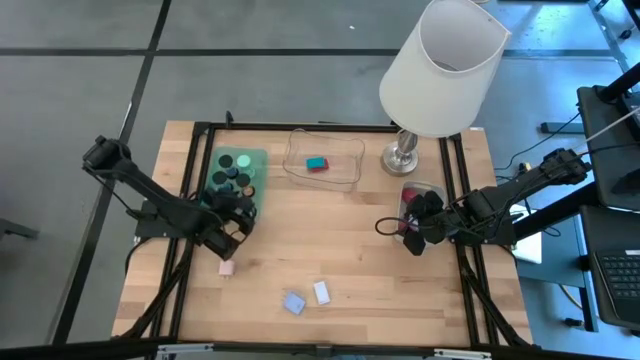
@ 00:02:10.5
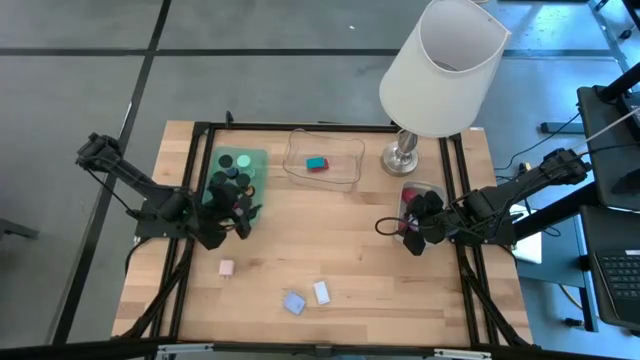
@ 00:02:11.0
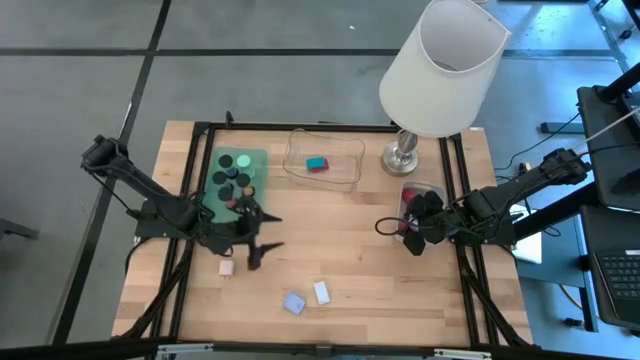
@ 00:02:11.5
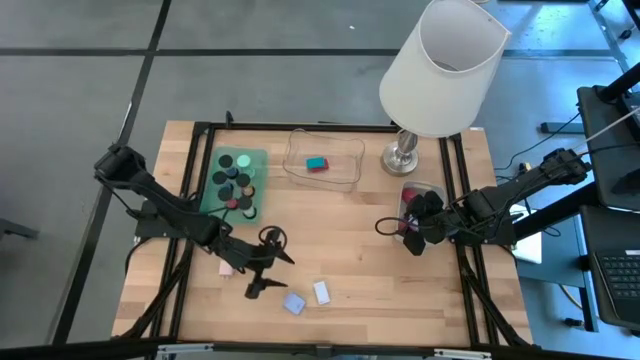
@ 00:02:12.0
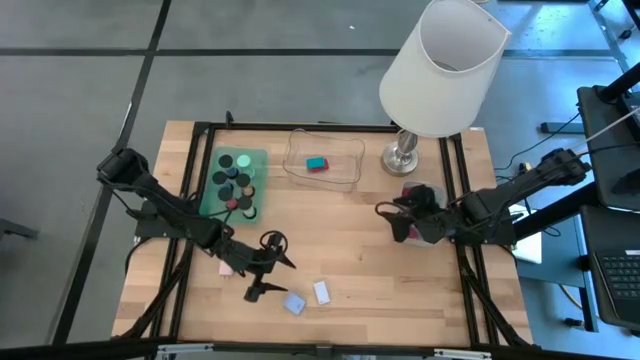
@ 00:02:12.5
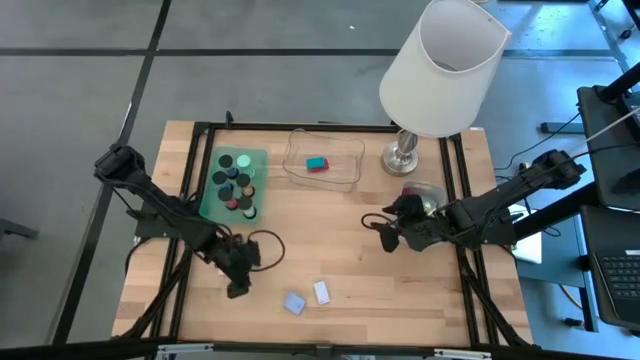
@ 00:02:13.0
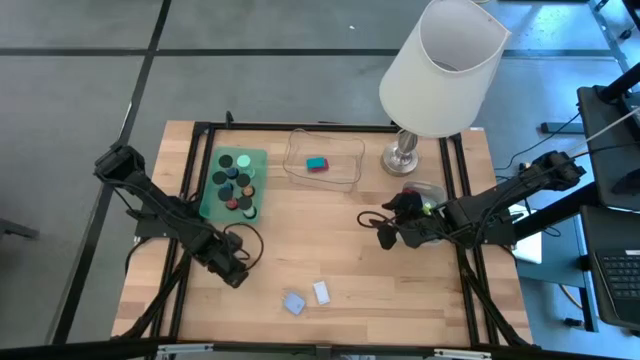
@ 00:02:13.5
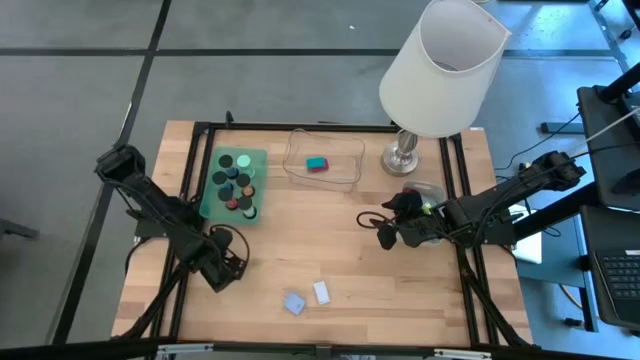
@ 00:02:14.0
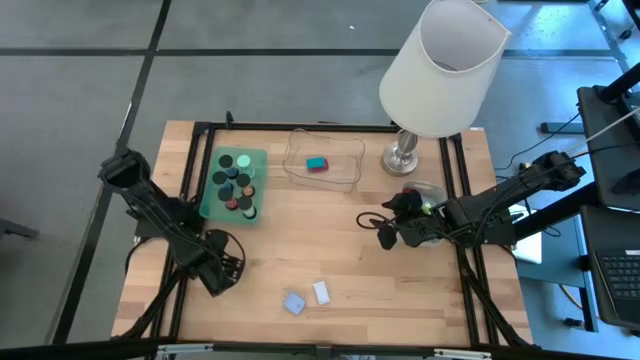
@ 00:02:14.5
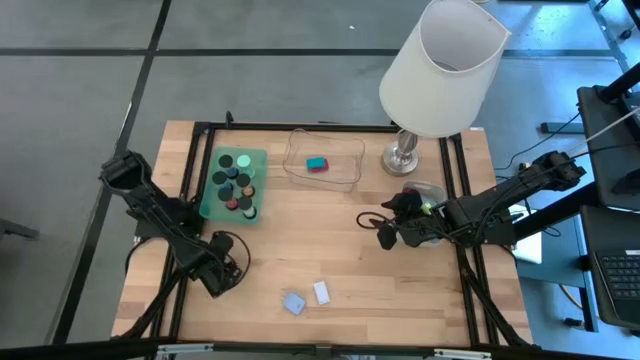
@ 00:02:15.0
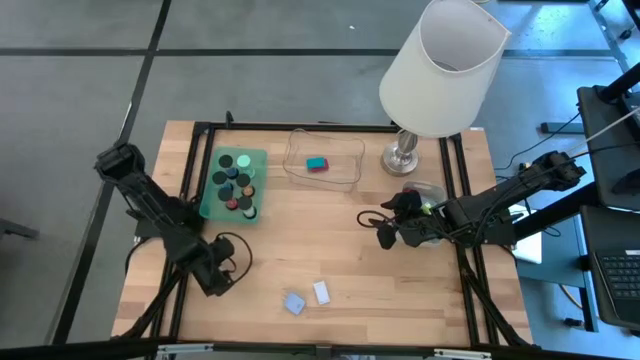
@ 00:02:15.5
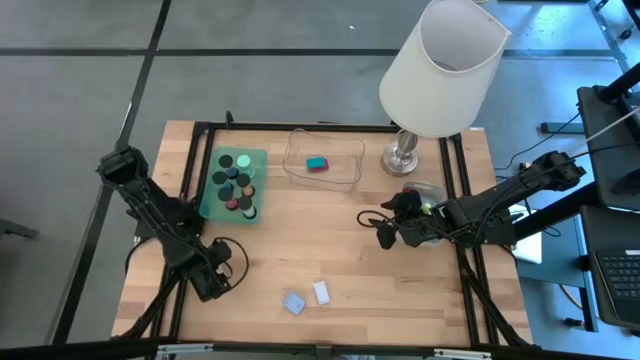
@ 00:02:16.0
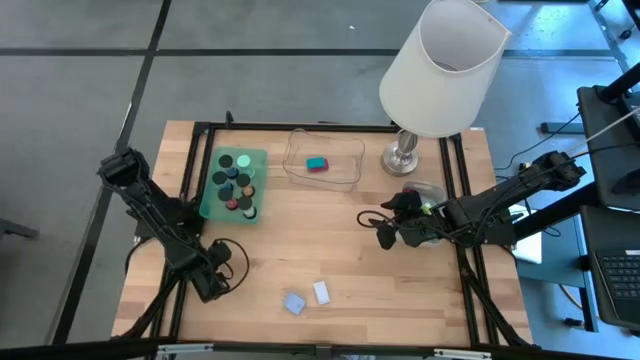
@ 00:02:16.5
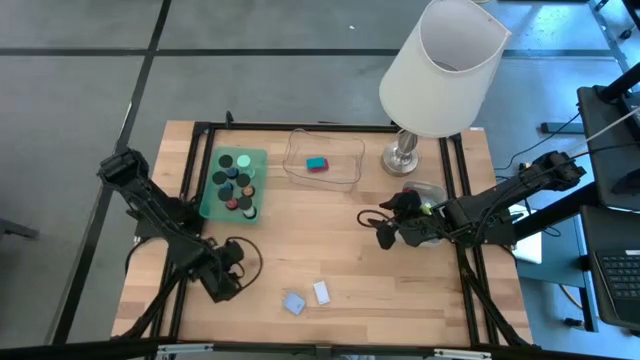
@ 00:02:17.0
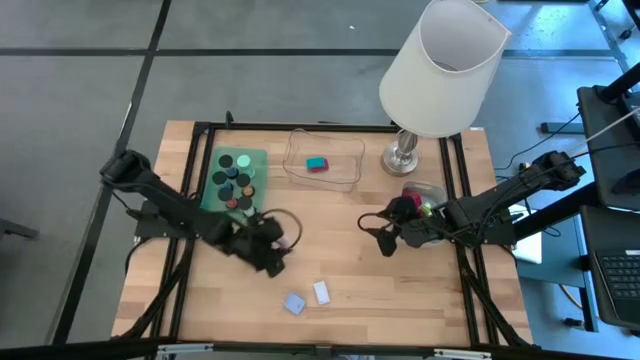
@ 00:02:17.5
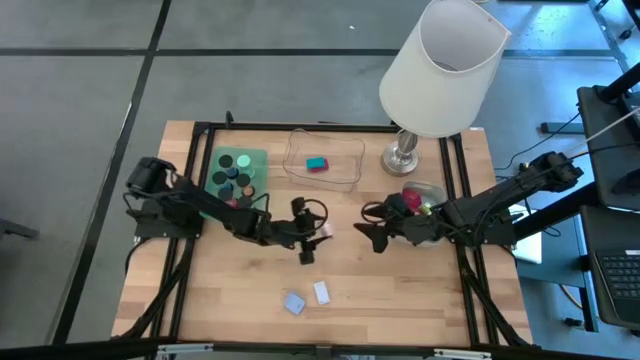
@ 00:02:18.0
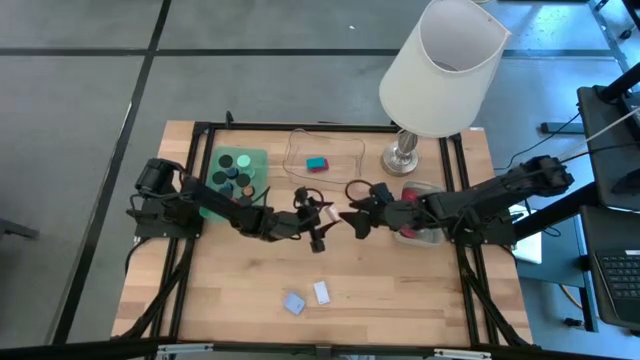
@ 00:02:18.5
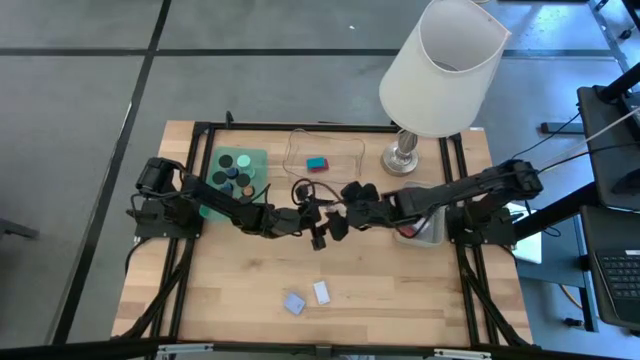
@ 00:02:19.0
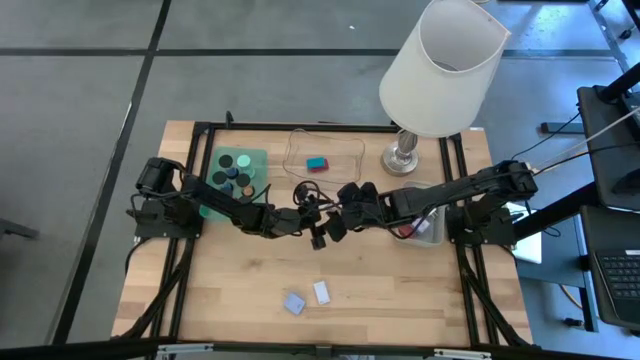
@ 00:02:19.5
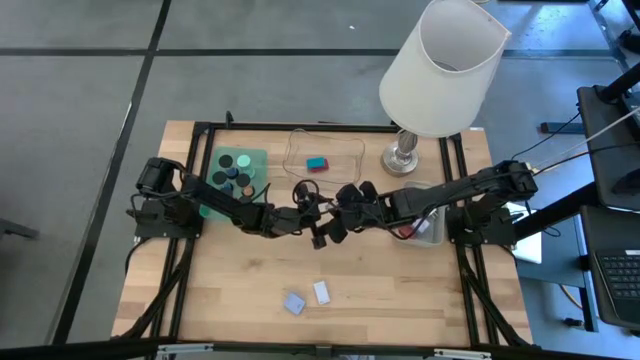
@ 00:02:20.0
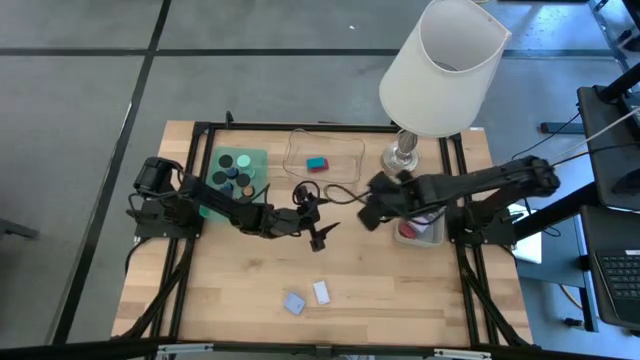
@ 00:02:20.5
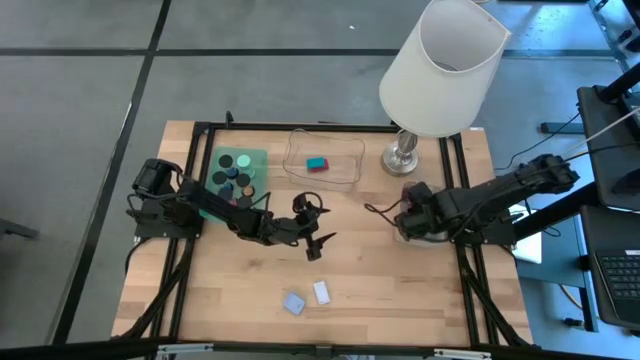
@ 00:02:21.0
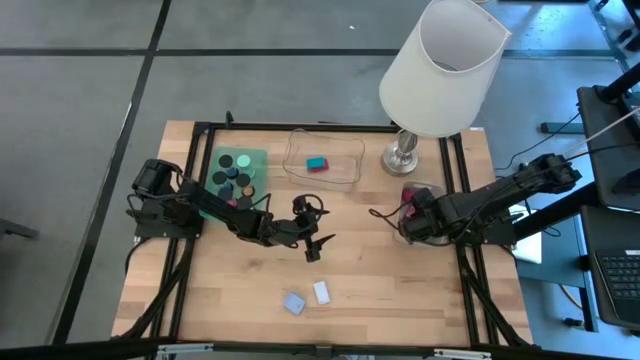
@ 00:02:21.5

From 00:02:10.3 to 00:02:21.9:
Task: Pick & Place Office items
Put the light pink charger adapter into the gray bin

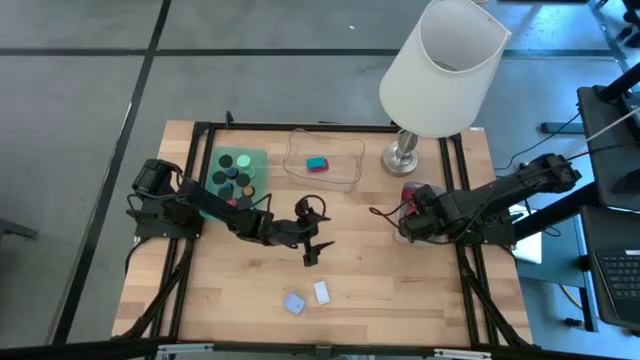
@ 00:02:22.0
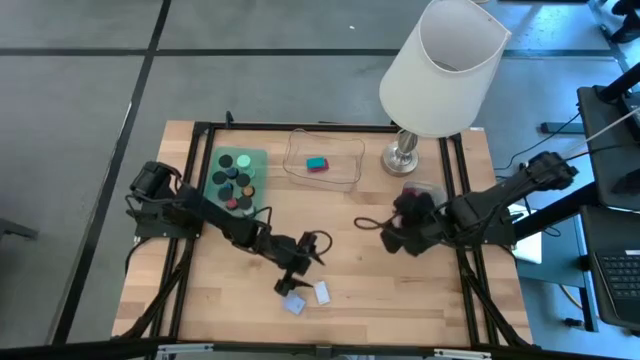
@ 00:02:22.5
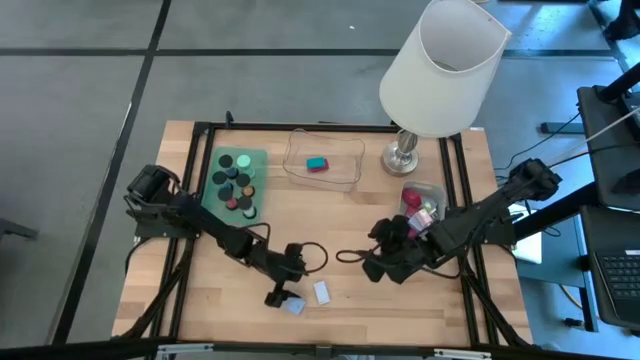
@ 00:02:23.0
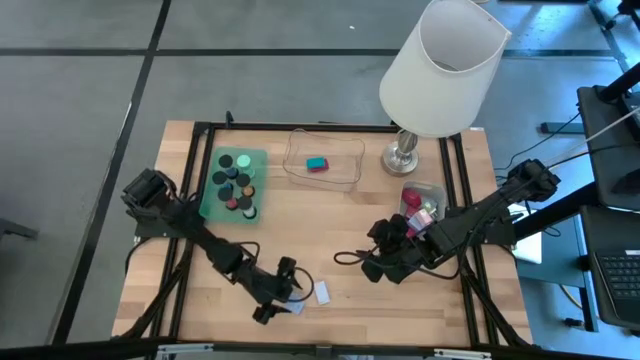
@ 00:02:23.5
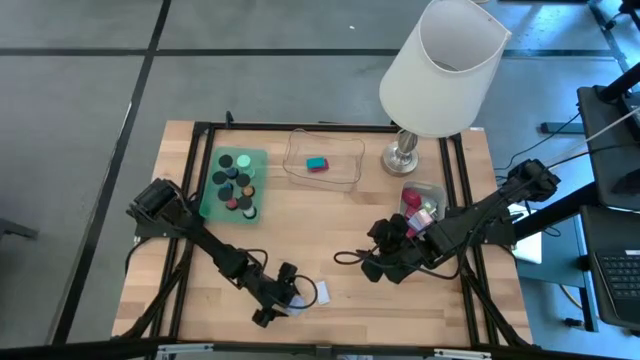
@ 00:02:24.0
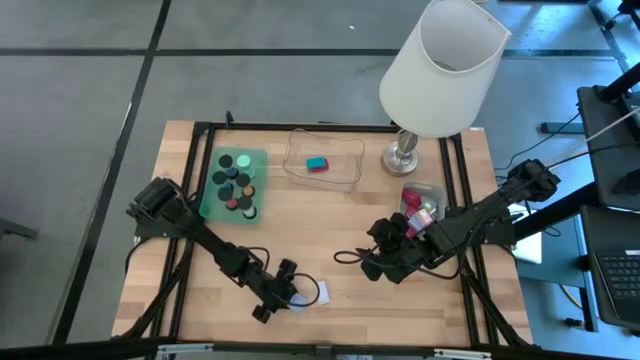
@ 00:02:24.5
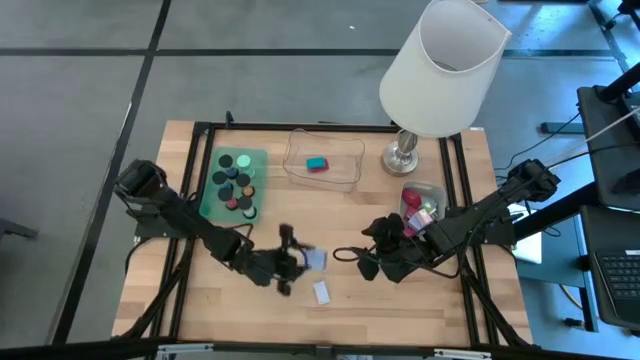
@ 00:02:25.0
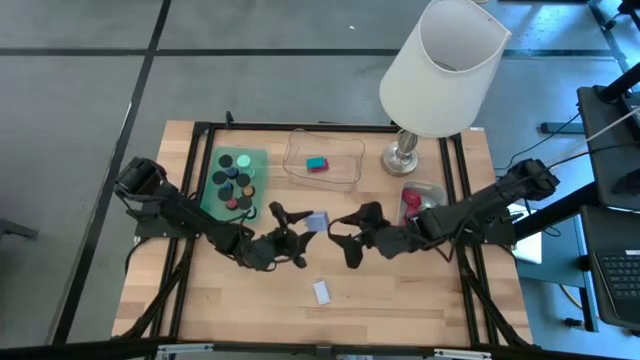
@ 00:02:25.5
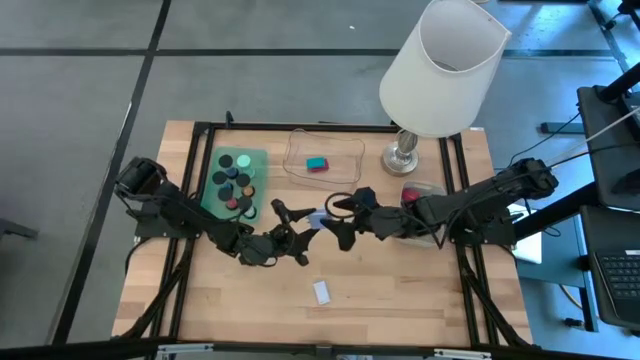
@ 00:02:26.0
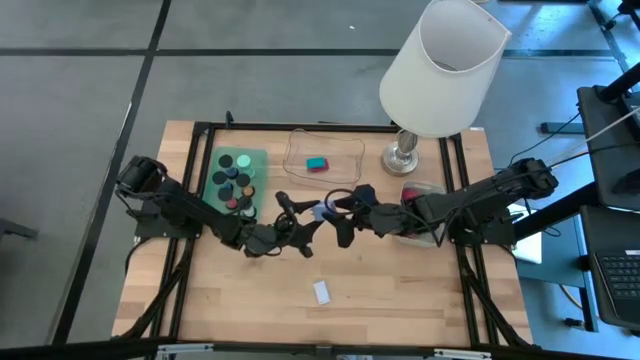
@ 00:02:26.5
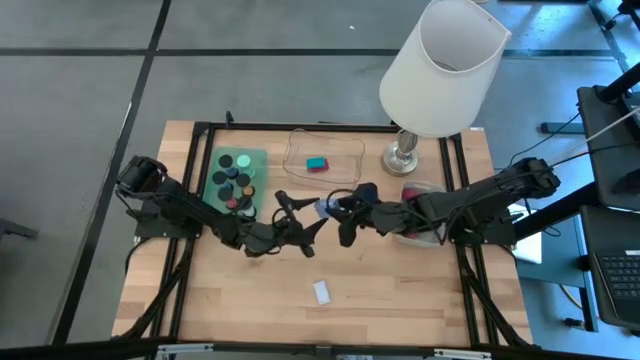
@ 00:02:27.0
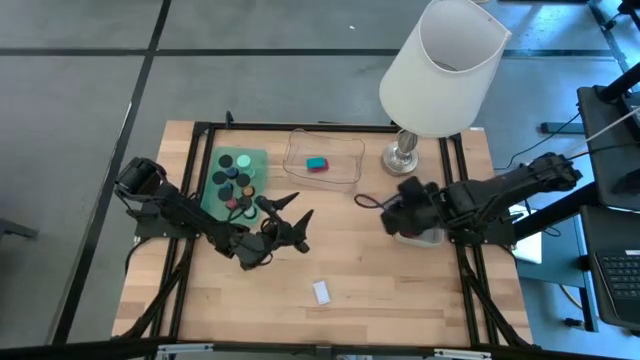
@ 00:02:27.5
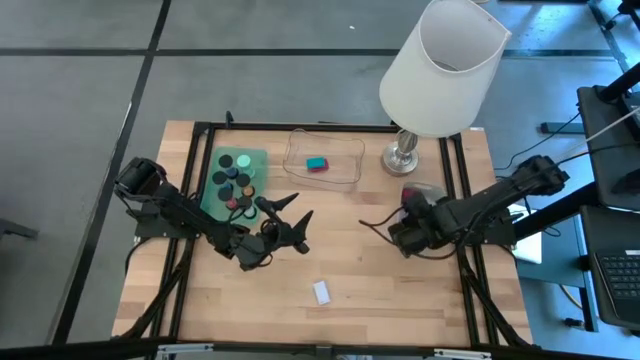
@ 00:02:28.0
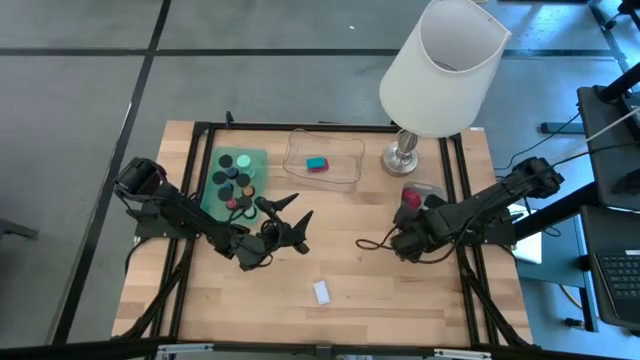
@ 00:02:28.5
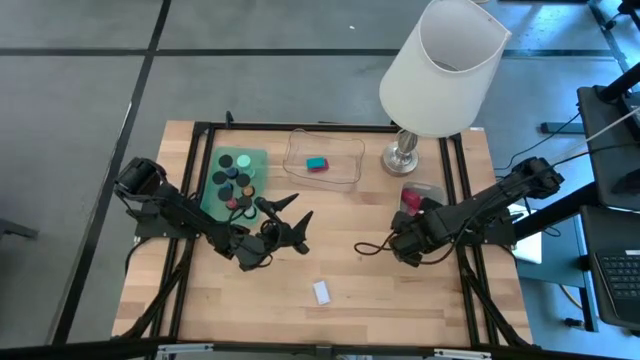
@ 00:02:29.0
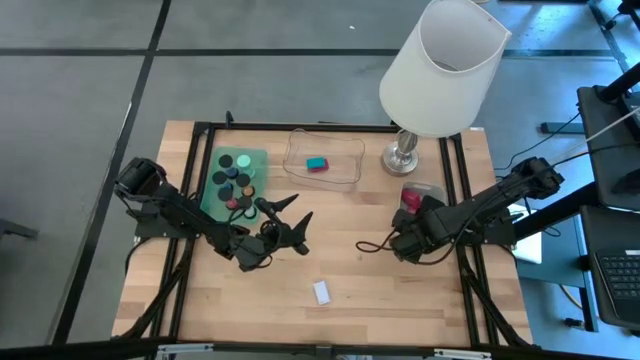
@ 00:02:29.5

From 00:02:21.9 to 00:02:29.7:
Put the blue charger adapter into the gray bin

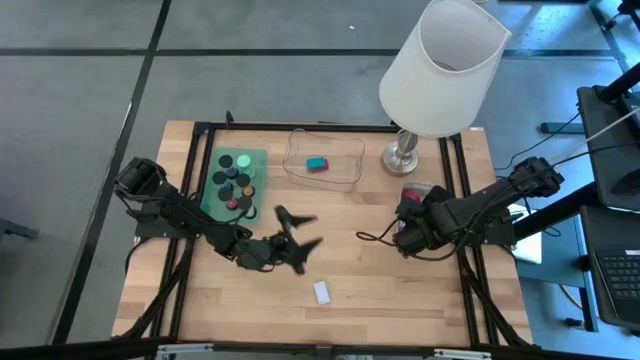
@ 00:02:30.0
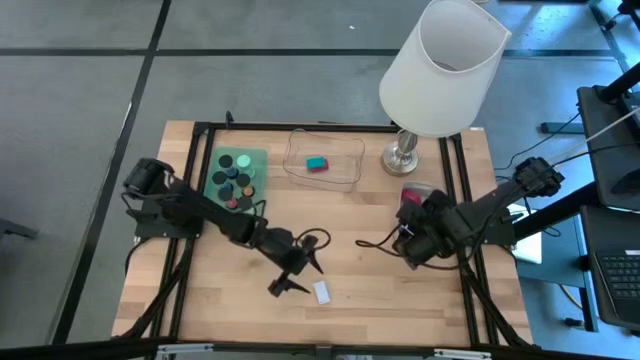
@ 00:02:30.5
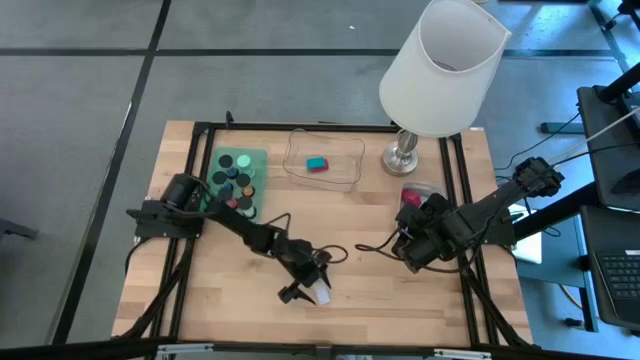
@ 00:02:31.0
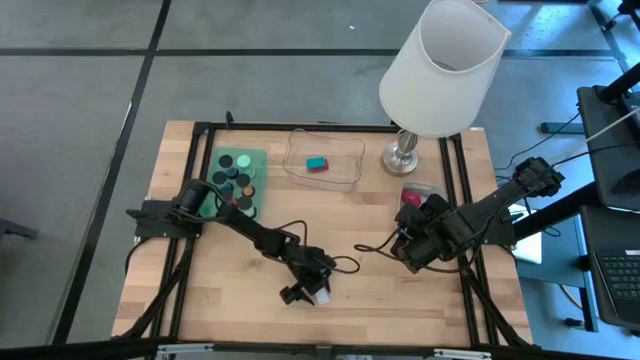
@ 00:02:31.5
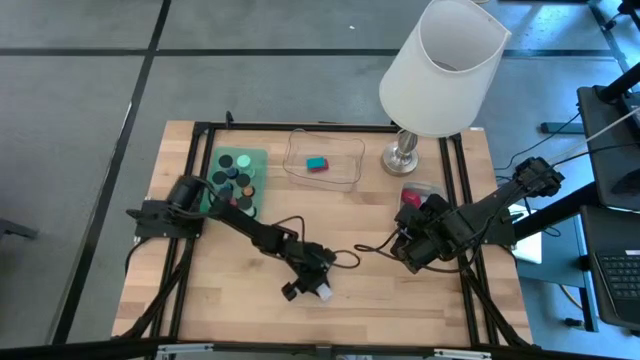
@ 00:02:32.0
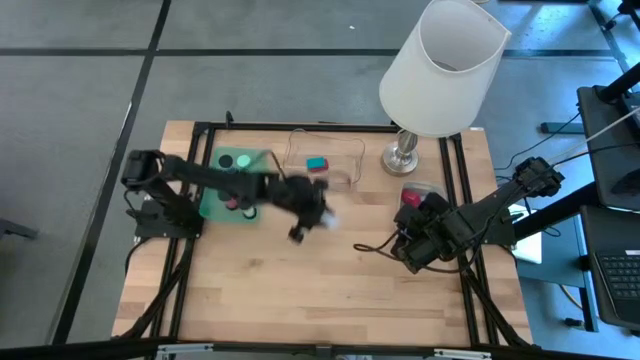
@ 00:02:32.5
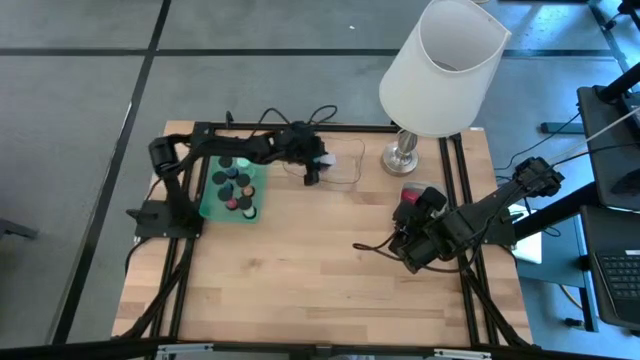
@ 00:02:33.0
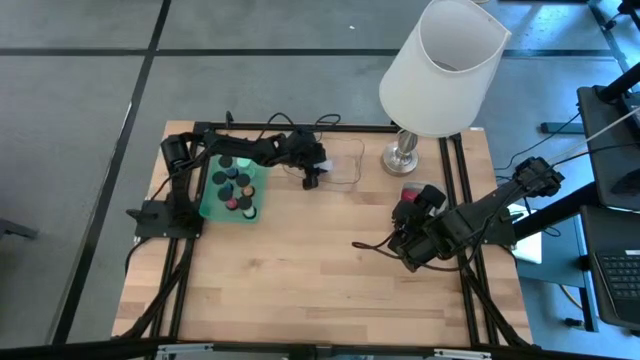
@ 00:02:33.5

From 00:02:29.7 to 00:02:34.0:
Put the white digital clock into the transparent bin
